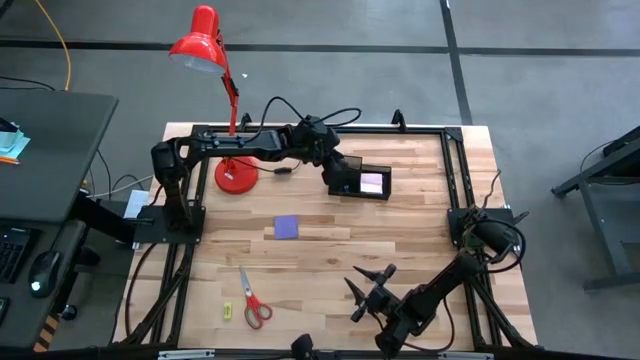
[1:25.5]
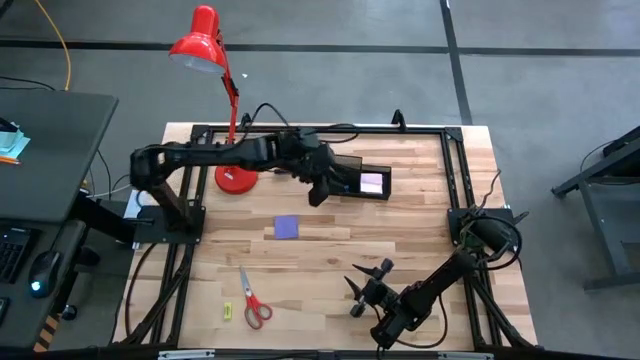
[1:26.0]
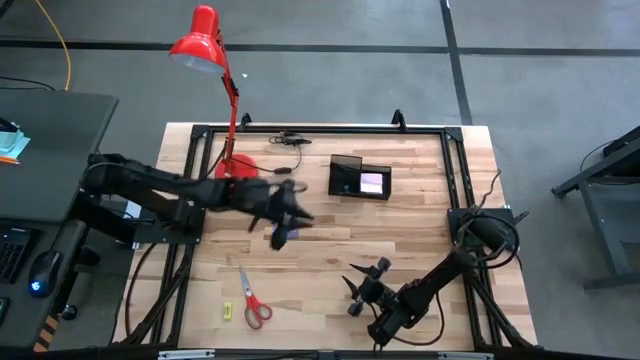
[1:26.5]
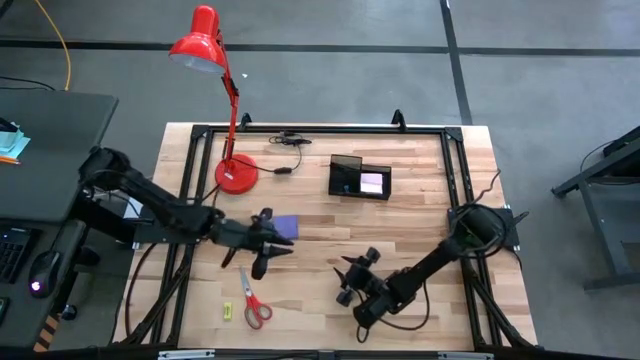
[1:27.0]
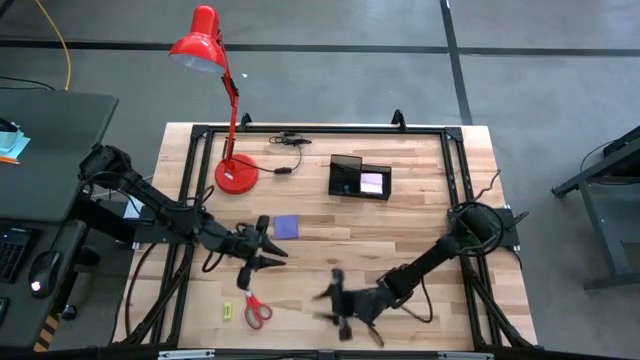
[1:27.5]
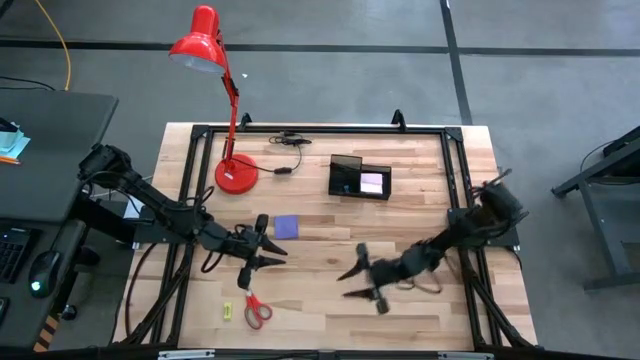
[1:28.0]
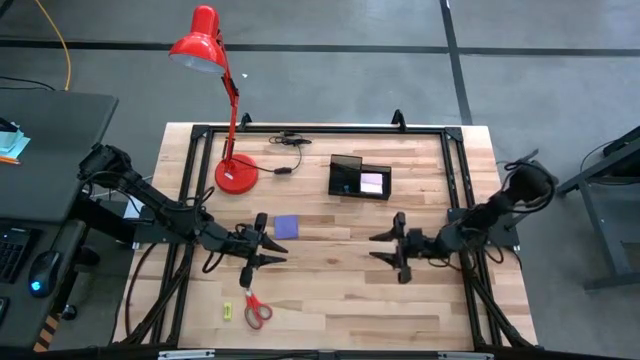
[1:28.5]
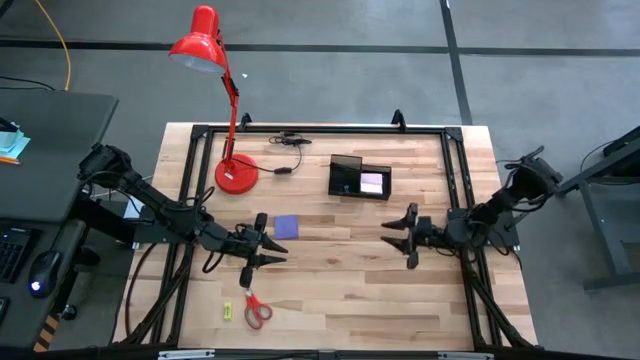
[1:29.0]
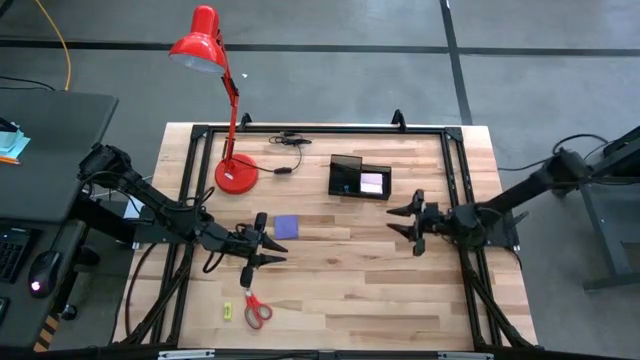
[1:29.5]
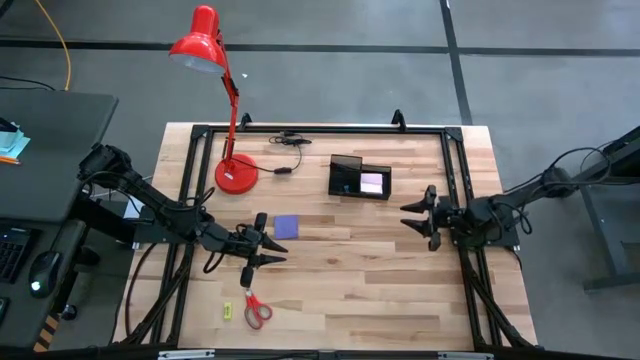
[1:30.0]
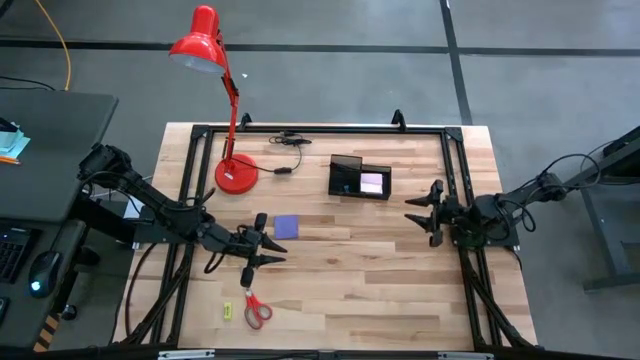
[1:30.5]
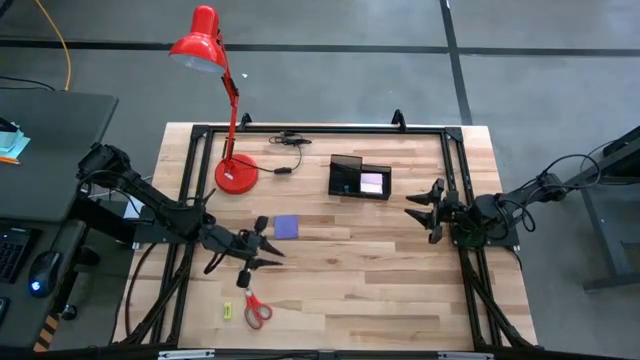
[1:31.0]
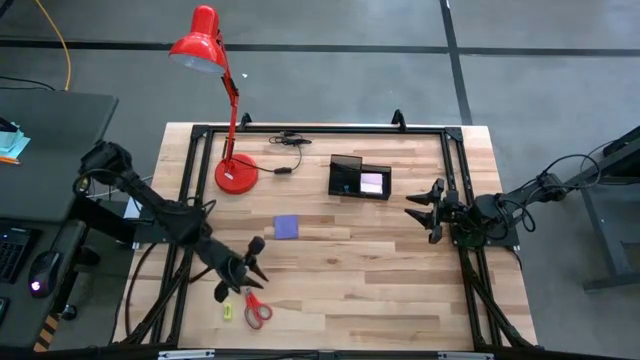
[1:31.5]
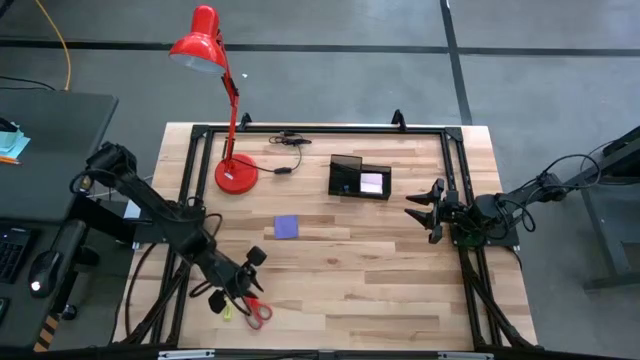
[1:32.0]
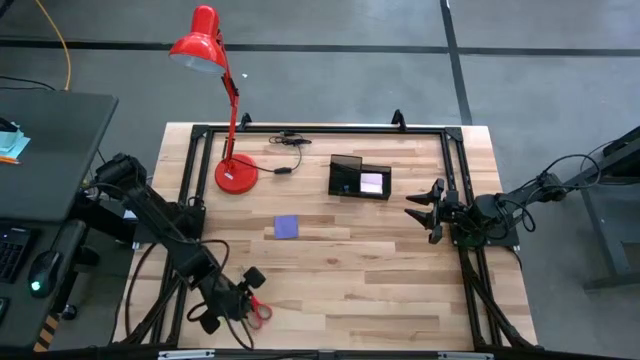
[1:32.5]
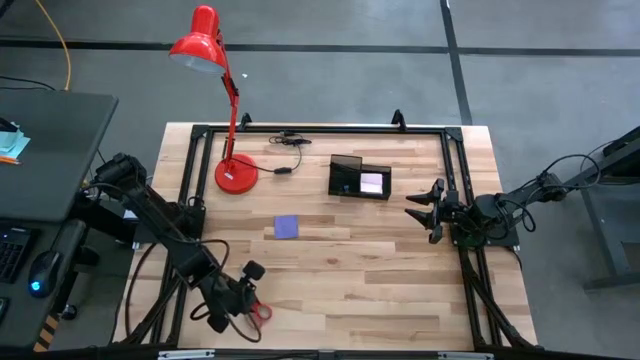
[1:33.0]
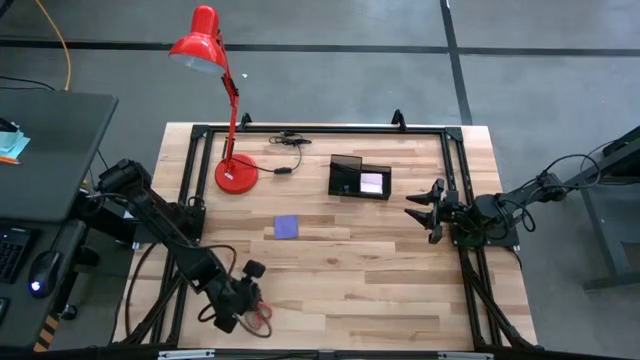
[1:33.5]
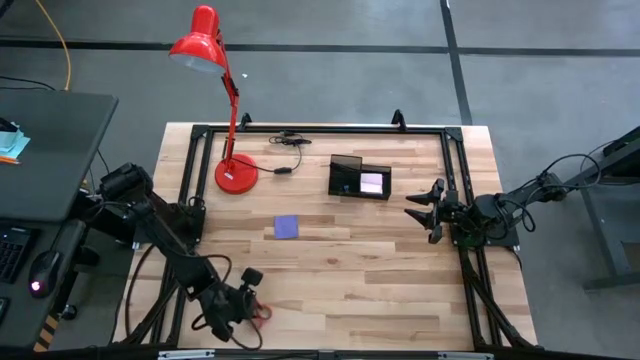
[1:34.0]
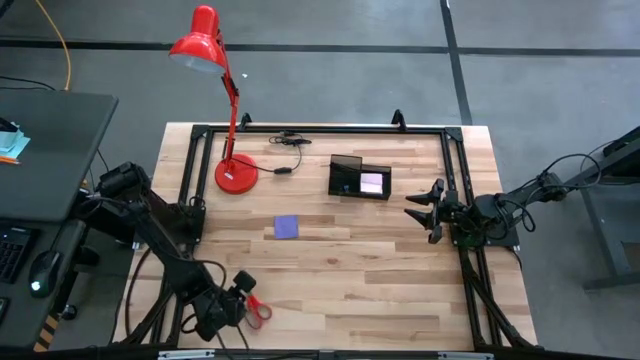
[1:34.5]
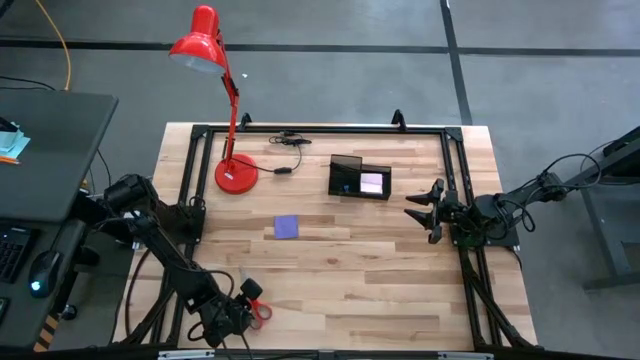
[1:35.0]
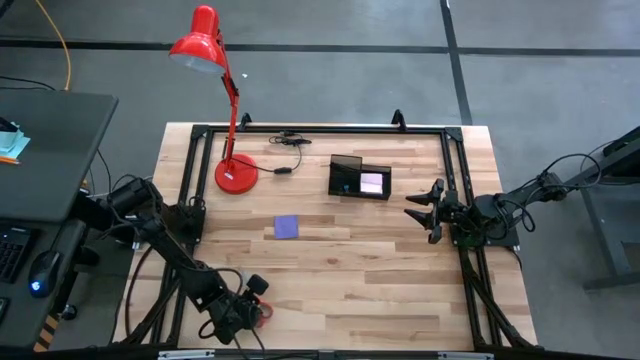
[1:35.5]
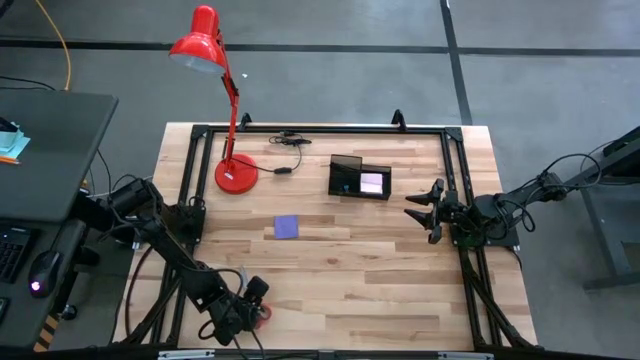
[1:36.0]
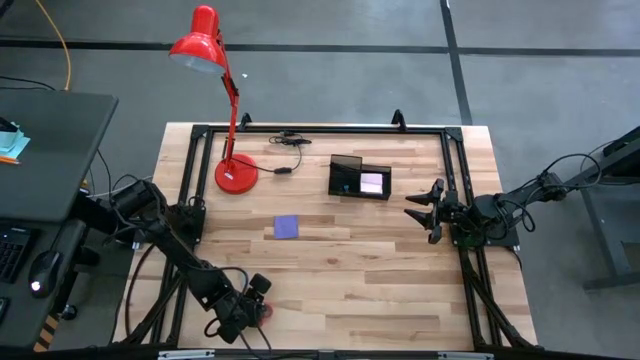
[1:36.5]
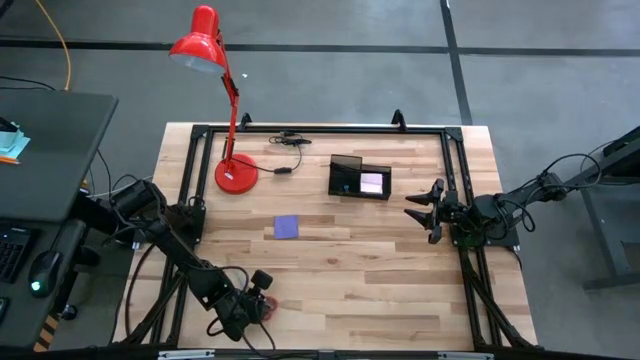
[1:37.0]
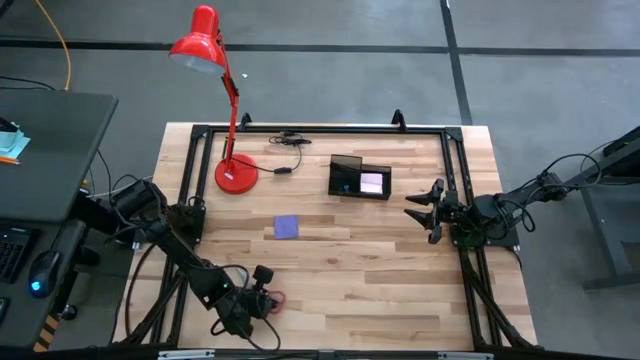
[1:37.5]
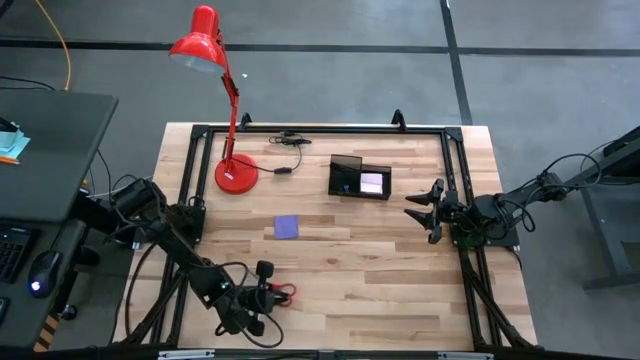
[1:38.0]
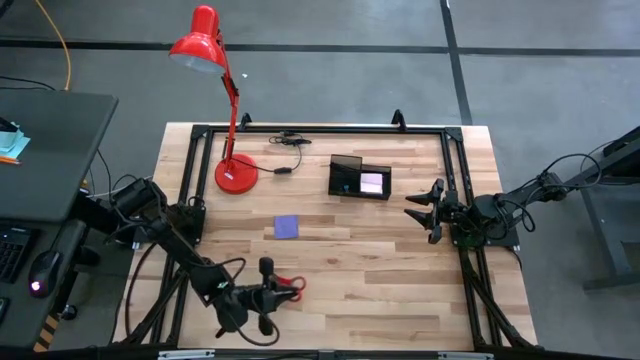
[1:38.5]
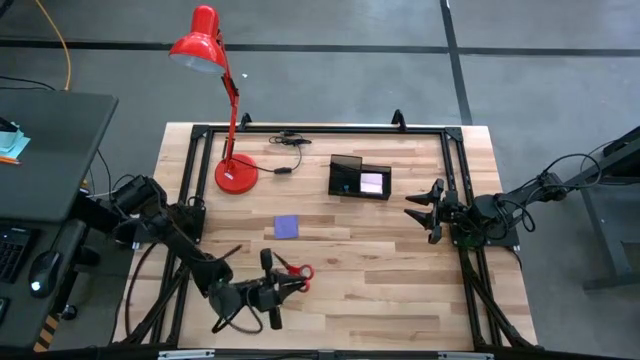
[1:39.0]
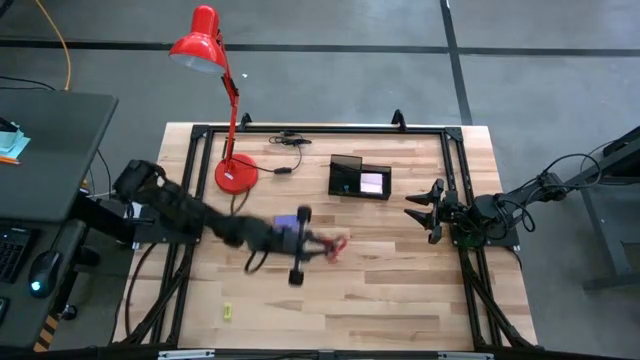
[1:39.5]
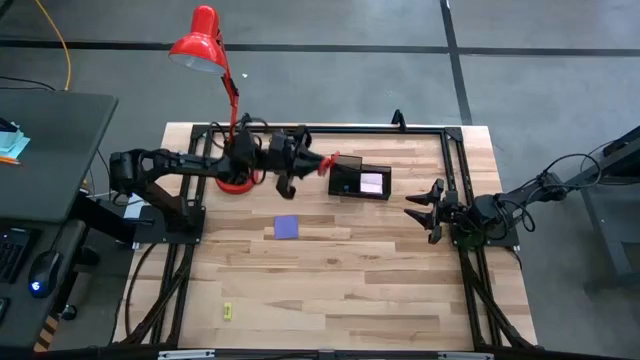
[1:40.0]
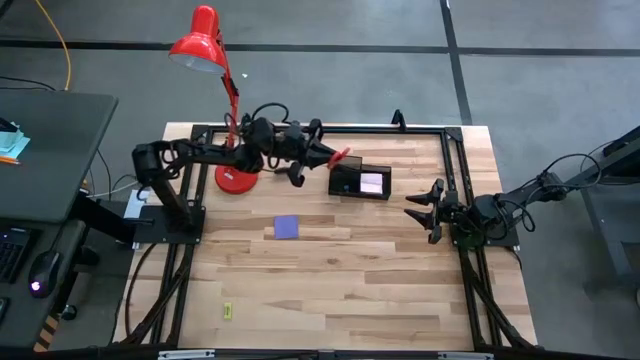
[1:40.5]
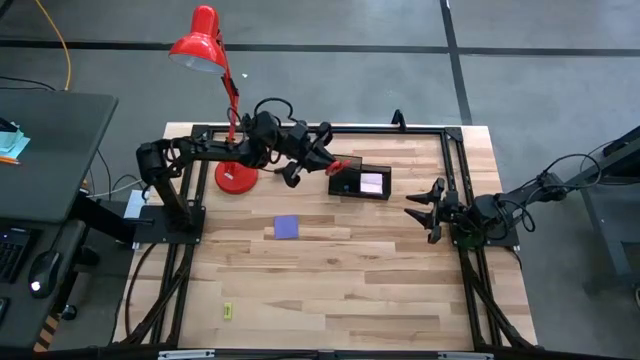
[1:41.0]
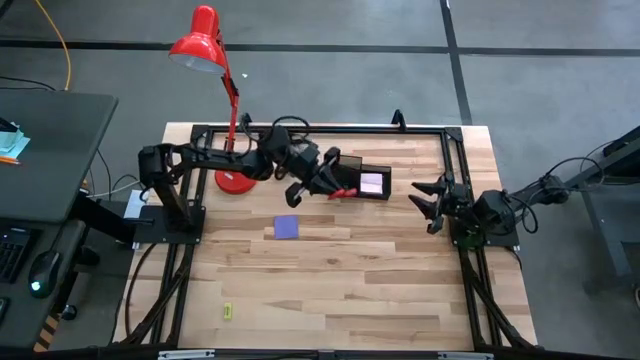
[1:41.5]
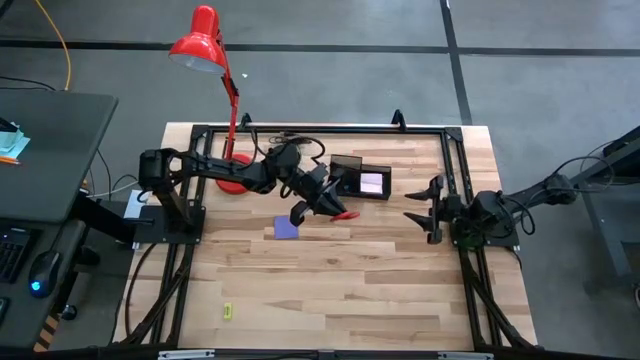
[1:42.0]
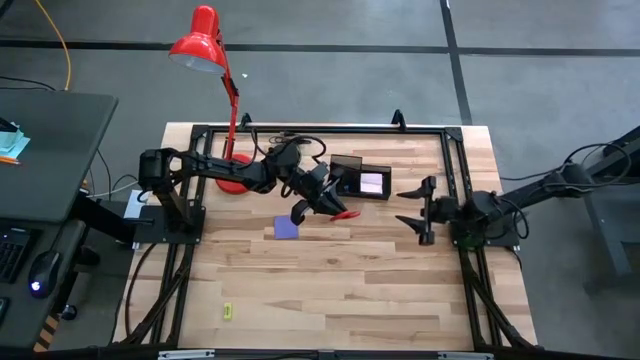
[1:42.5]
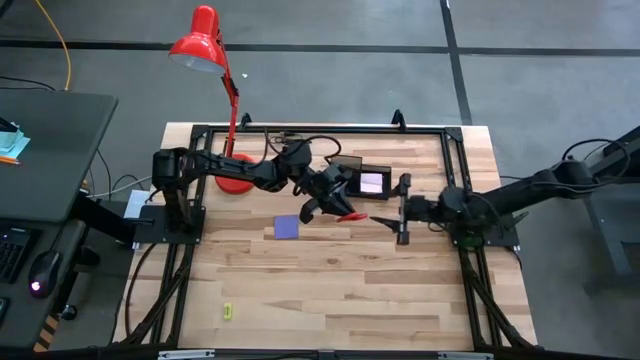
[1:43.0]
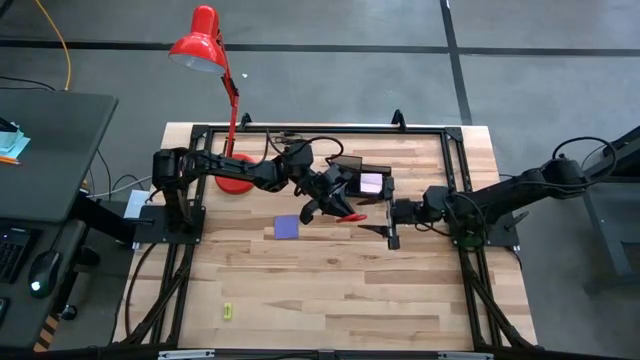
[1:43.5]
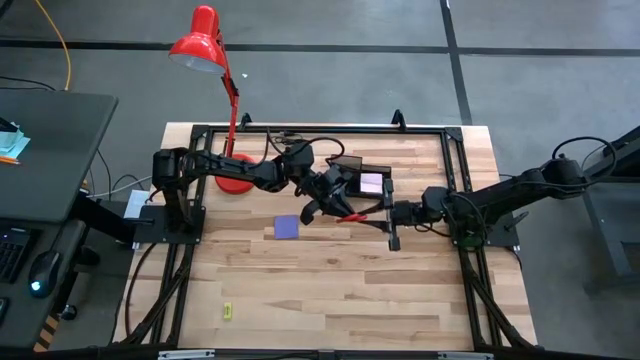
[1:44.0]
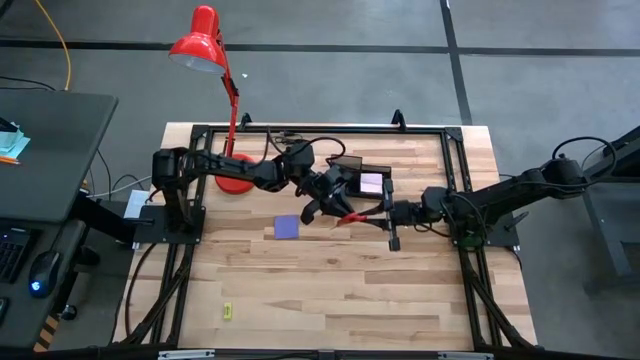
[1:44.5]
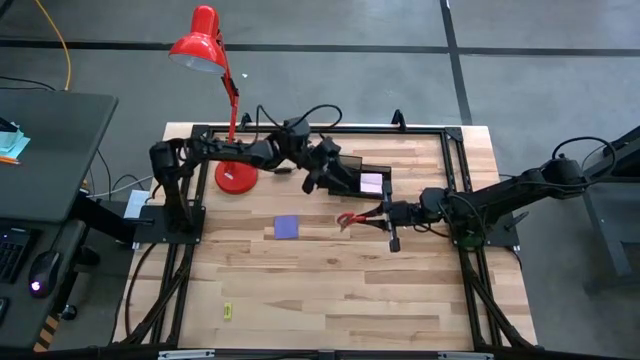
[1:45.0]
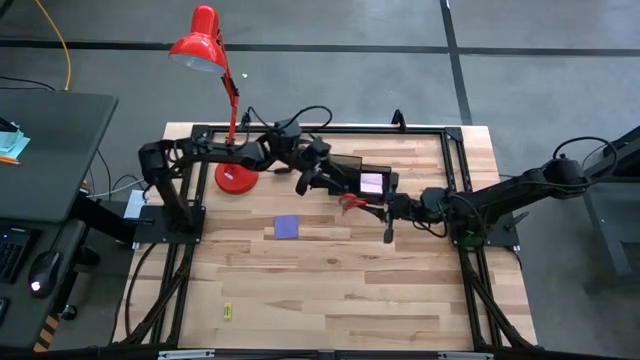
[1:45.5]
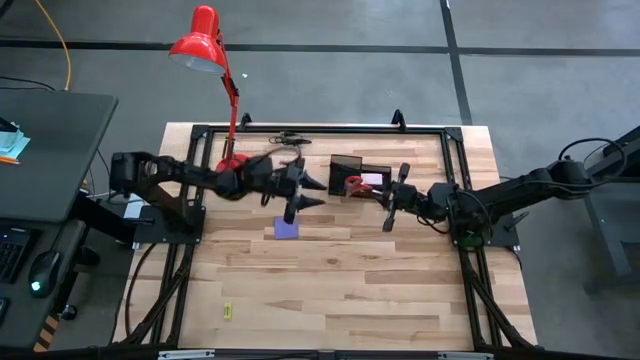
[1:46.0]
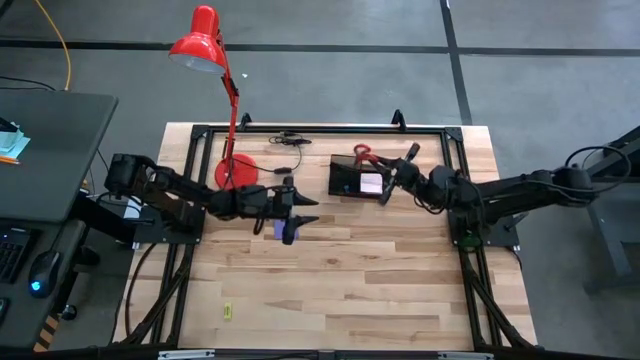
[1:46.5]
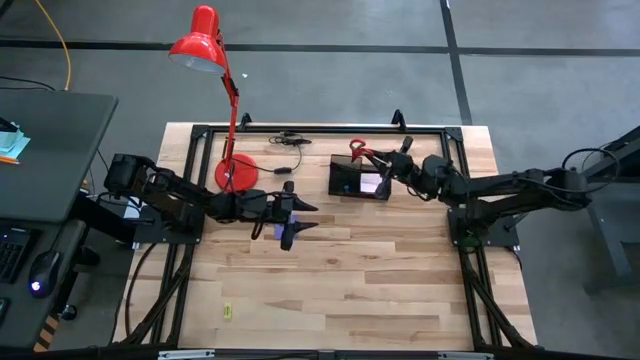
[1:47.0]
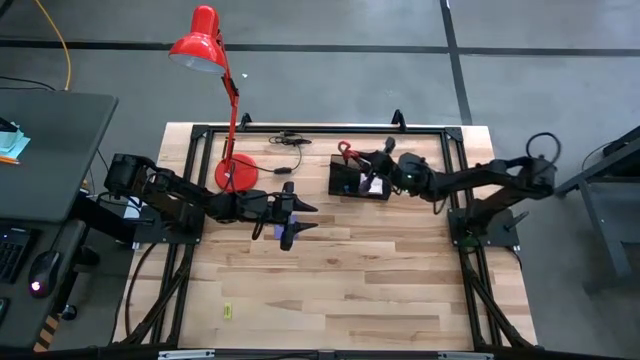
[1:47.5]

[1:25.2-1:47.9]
Task: Pick and place office supplies into organizer
Put the red scissor into the black desk organizer
